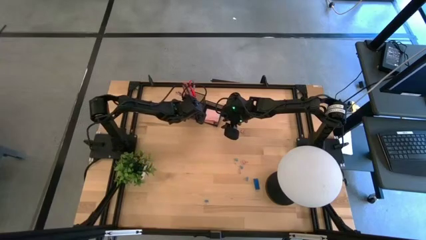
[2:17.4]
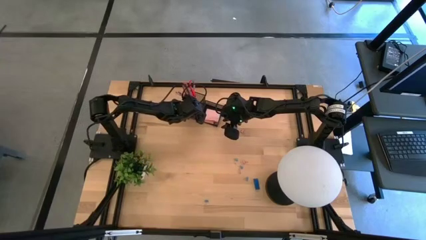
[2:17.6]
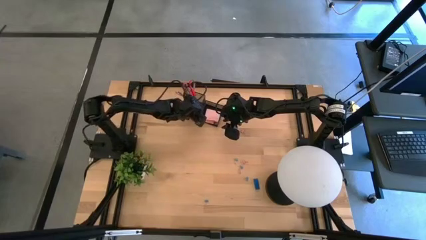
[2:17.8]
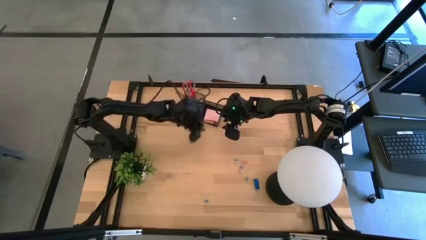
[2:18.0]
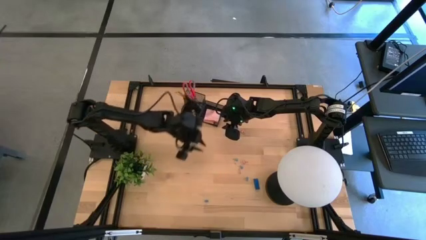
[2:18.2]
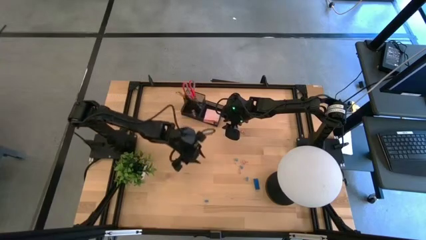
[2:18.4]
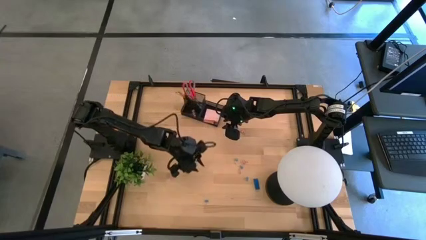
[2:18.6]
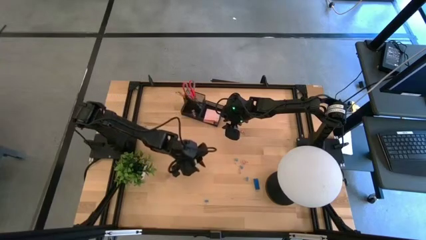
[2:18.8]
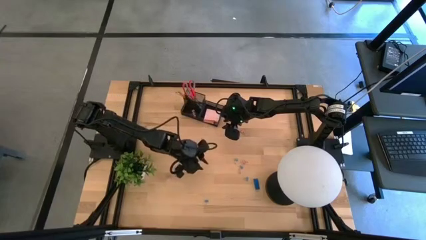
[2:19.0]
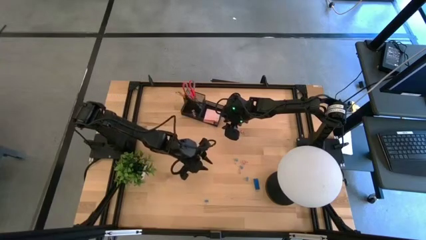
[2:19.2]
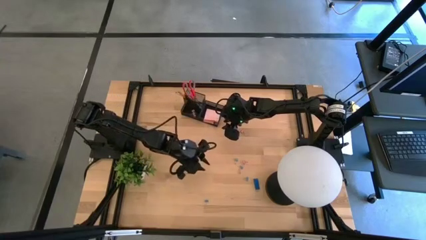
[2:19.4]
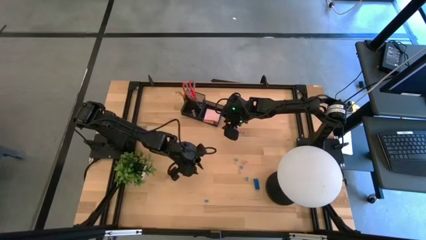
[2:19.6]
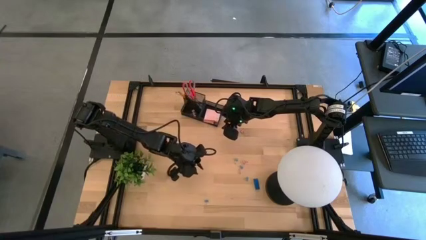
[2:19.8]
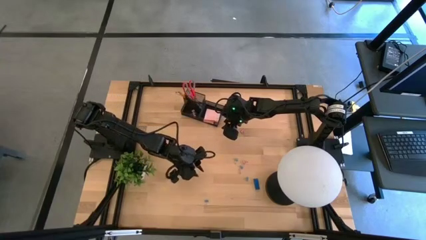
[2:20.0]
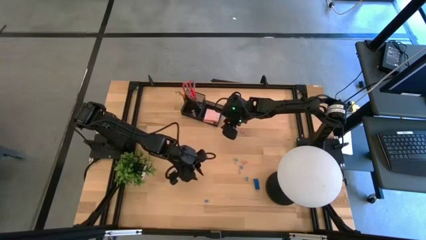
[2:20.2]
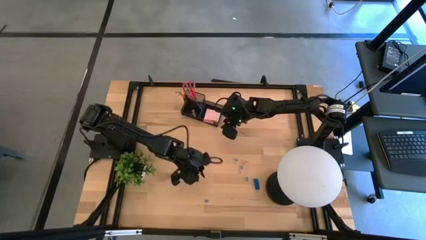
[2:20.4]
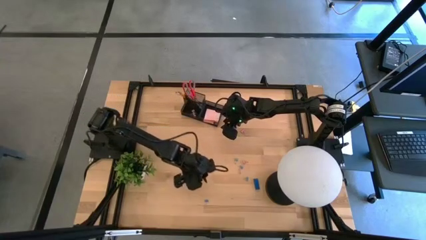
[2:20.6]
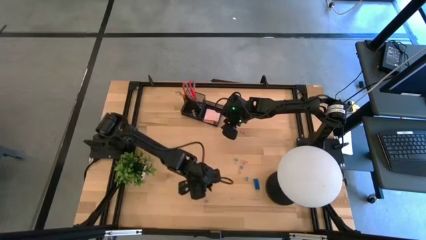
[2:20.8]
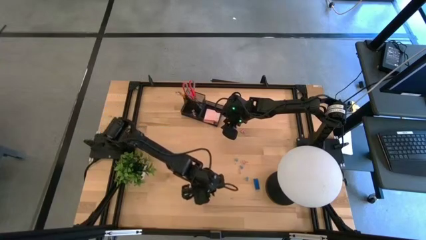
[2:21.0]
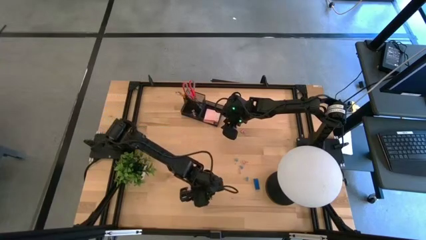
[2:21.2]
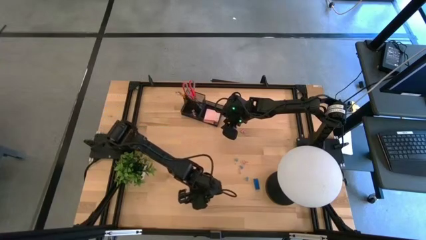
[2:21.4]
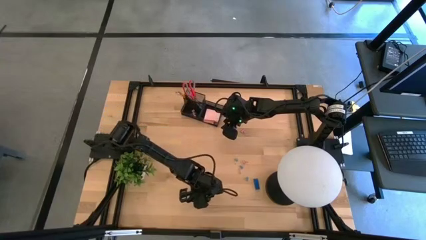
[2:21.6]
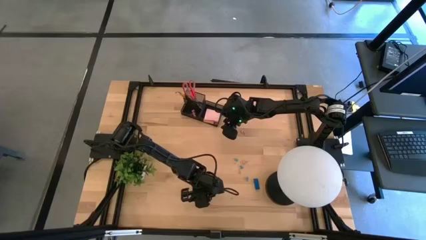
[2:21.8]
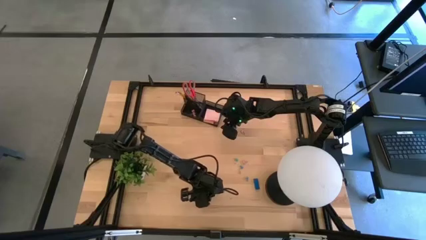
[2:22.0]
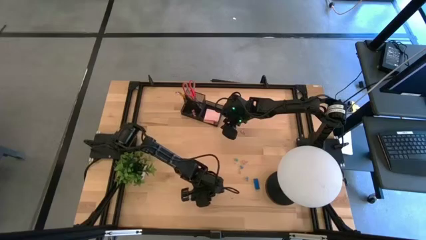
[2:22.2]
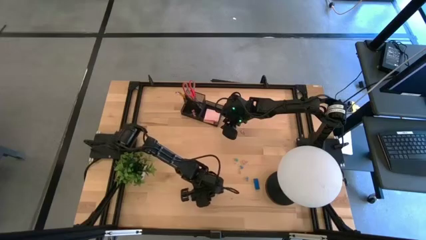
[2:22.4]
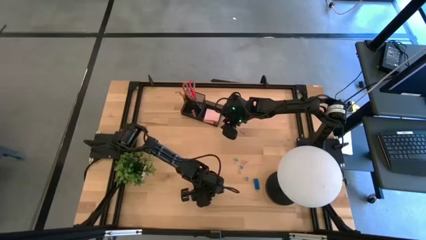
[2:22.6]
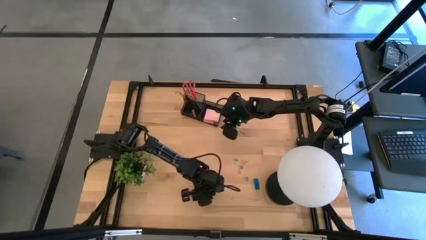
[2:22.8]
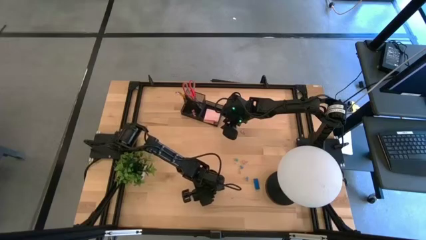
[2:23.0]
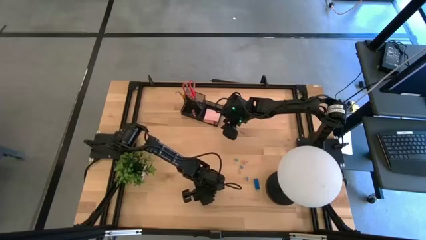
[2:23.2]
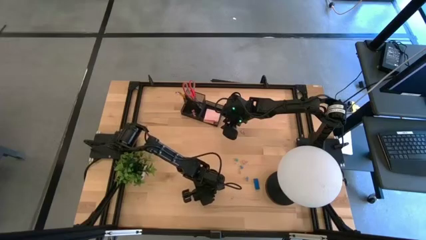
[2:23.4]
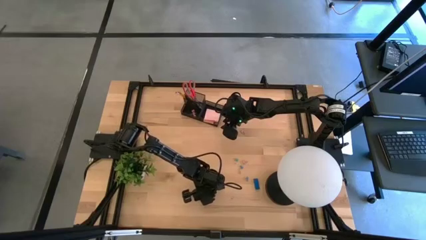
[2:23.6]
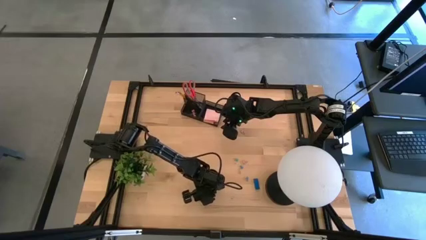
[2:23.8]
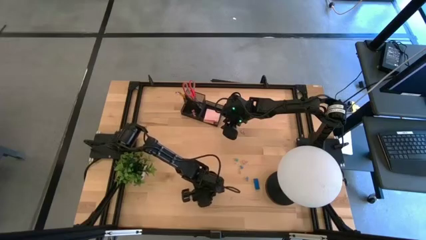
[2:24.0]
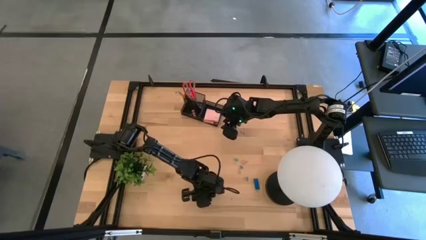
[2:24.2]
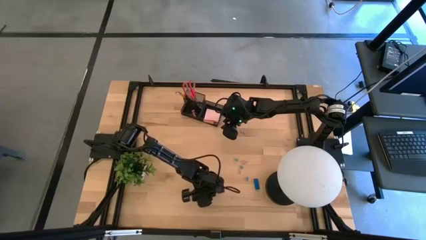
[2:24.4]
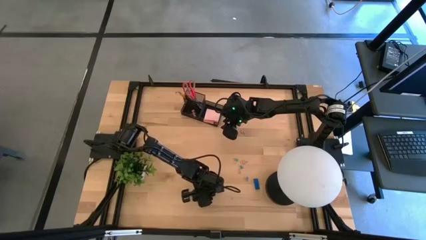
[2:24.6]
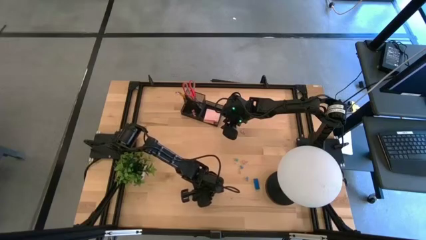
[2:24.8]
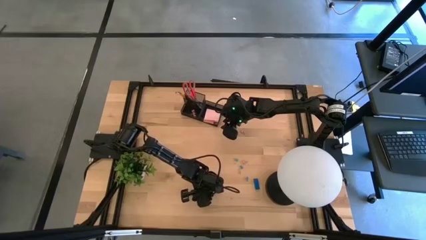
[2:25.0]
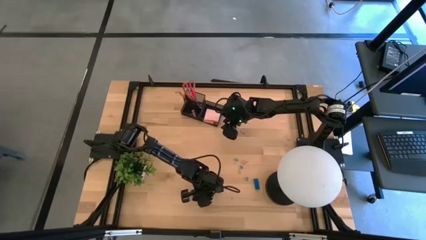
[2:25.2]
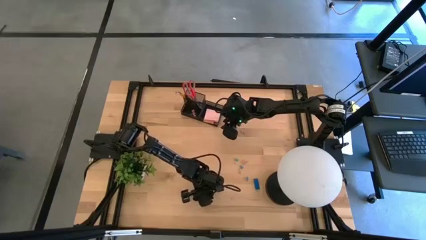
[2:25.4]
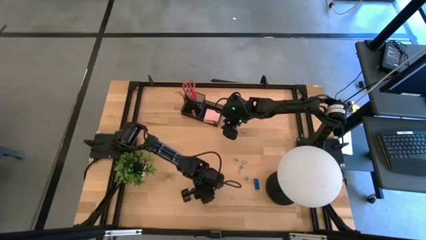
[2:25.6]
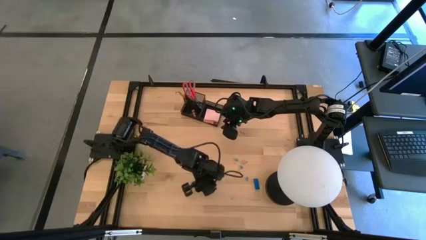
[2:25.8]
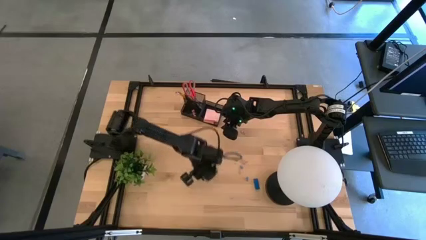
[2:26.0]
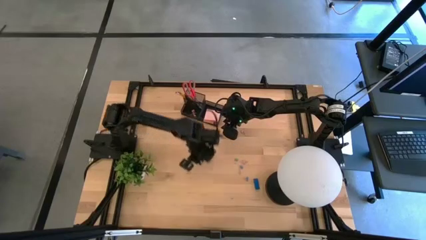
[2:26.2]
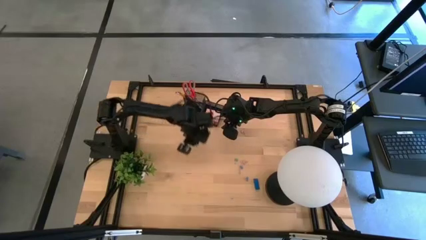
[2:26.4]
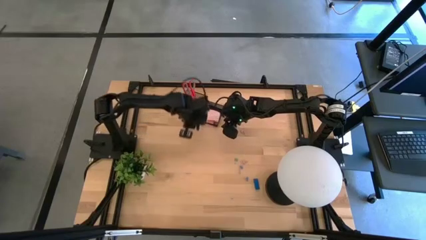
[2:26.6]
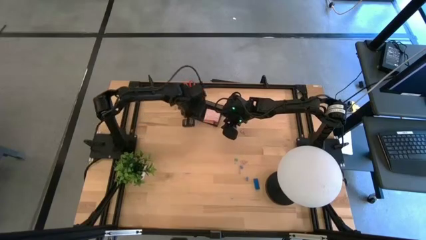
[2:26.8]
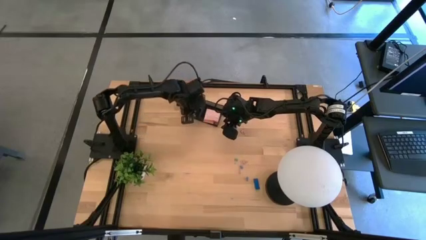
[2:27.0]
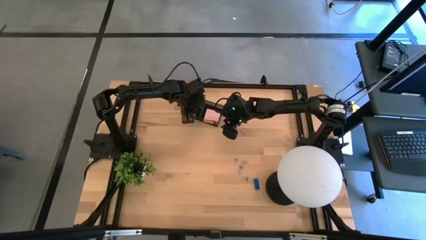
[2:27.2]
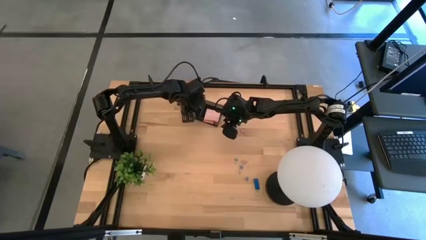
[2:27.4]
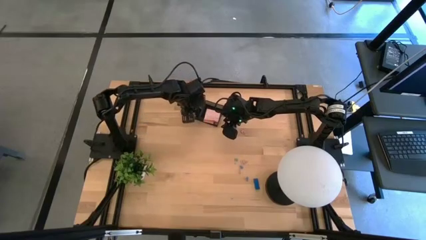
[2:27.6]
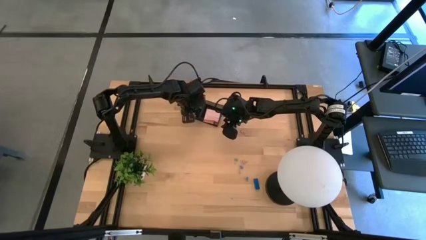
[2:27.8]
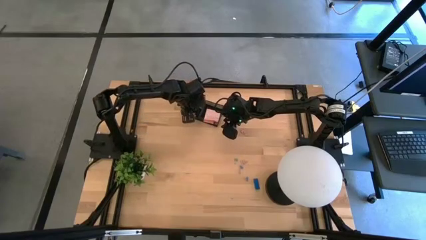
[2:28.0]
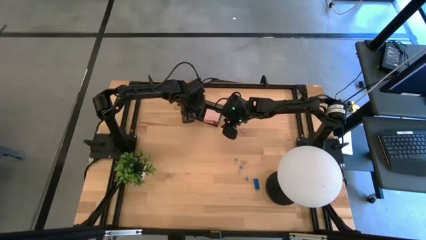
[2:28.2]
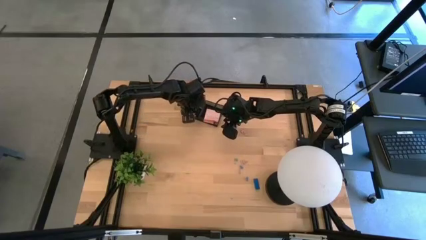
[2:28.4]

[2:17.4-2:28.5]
Task: Pick and place office supplies into organizer
Put the blue binder clip into the black desk organizer

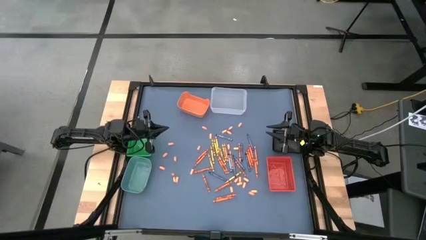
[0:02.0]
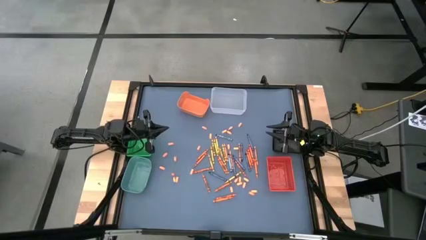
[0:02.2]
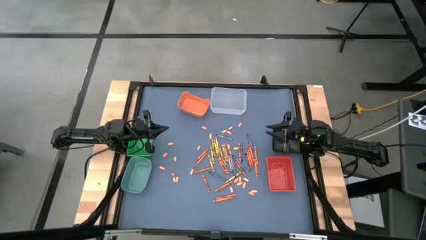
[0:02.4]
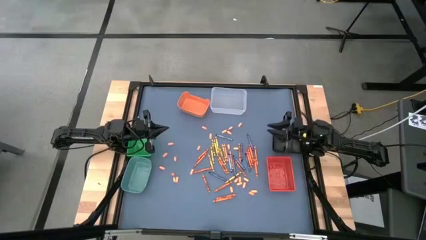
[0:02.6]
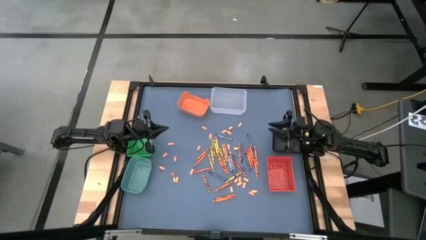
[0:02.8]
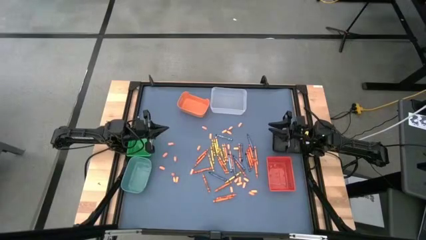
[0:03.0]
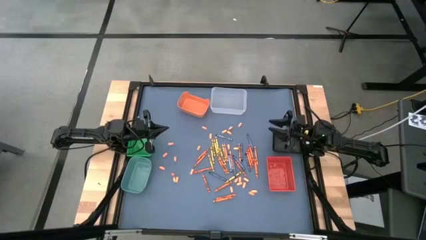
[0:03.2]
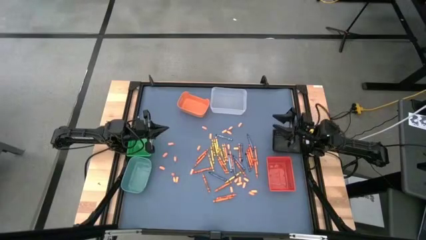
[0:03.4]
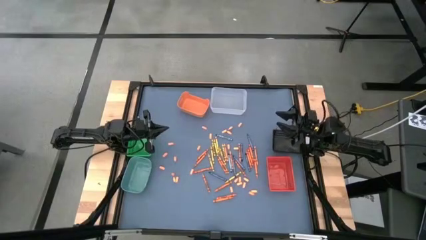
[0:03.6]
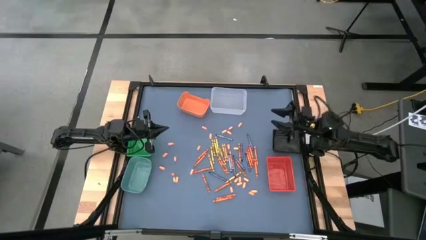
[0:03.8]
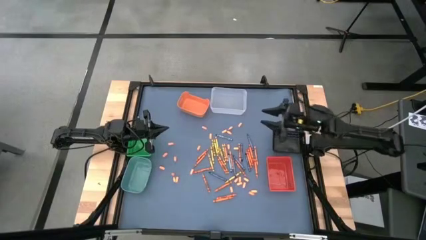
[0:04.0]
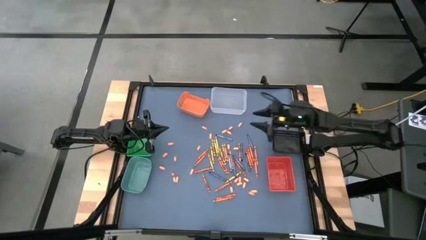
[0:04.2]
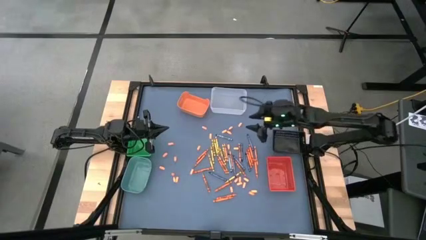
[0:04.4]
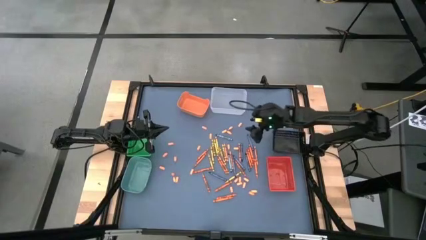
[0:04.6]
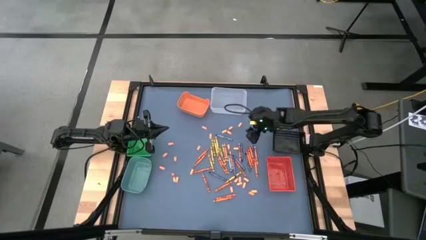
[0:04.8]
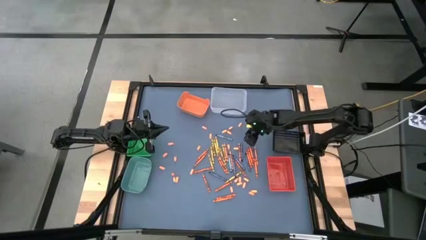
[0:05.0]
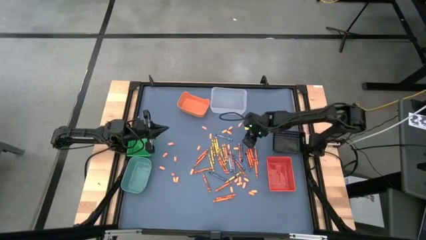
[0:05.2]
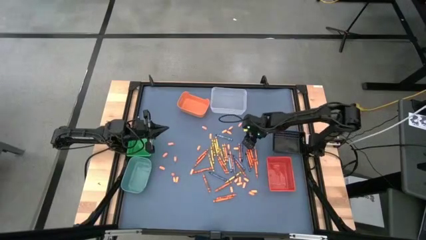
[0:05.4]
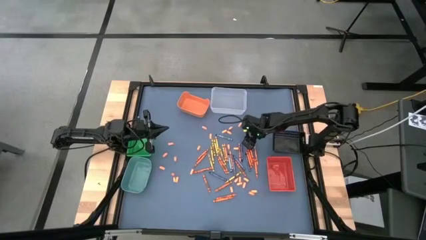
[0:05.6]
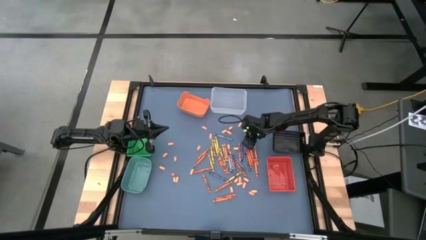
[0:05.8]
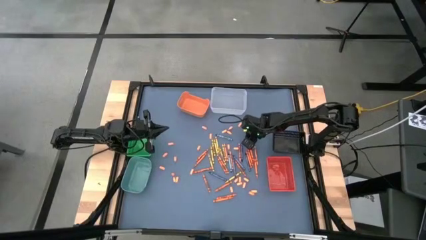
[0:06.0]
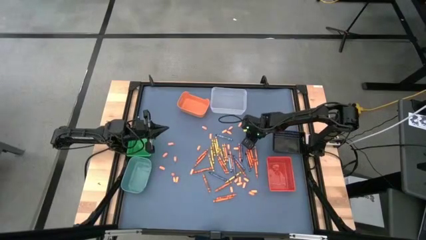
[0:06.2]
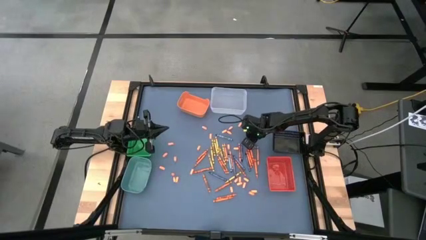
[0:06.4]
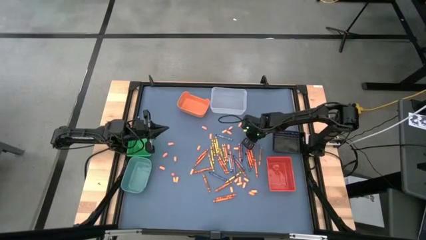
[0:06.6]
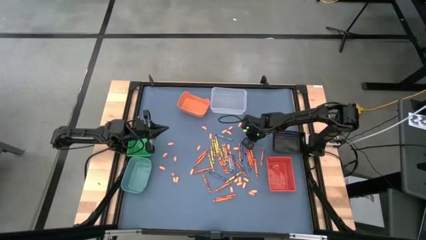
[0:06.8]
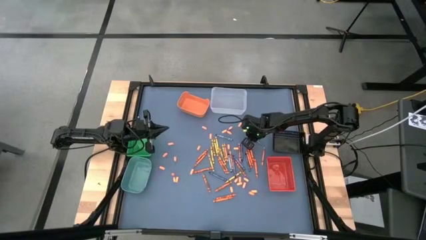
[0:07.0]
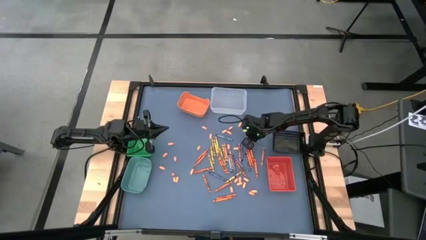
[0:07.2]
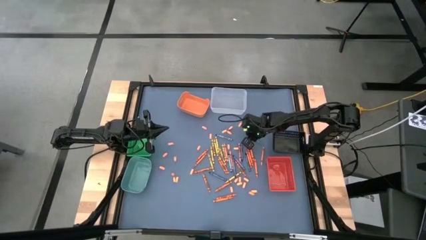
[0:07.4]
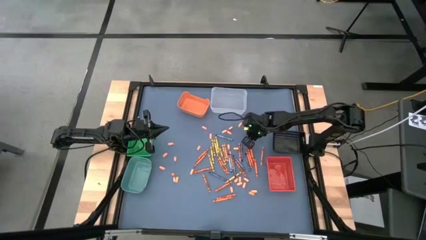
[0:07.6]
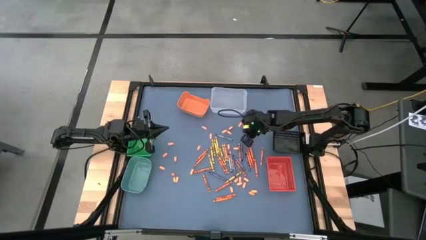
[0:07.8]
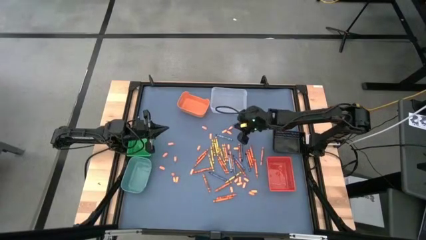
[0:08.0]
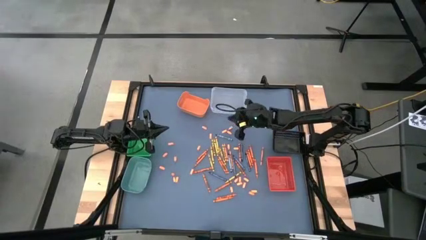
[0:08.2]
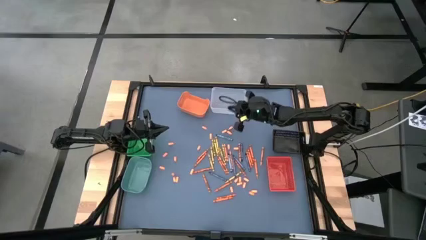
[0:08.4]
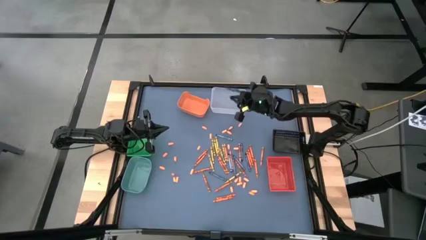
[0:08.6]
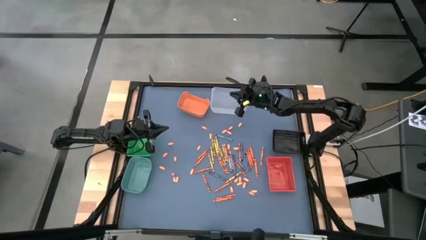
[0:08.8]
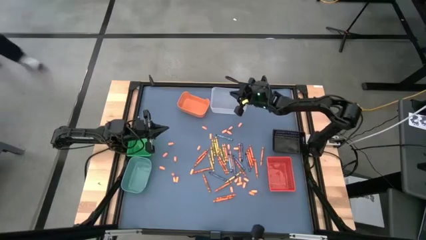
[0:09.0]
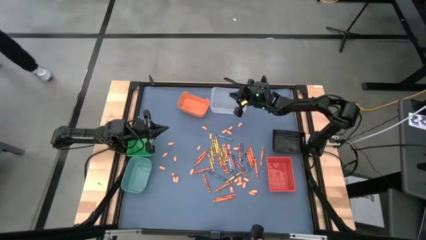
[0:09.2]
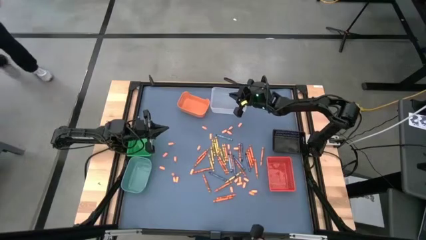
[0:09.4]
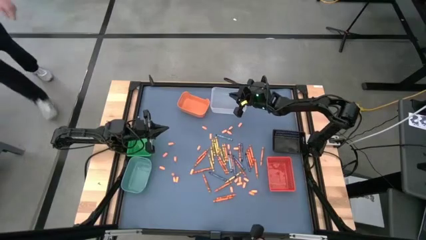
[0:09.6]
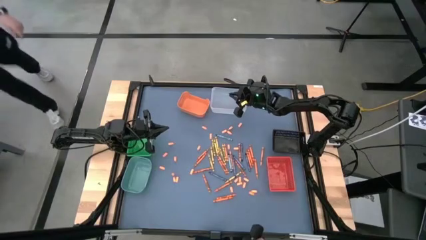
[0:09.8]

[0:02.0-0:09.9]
Task: Sort crayons
Put the blue crayon into the transparent bin
